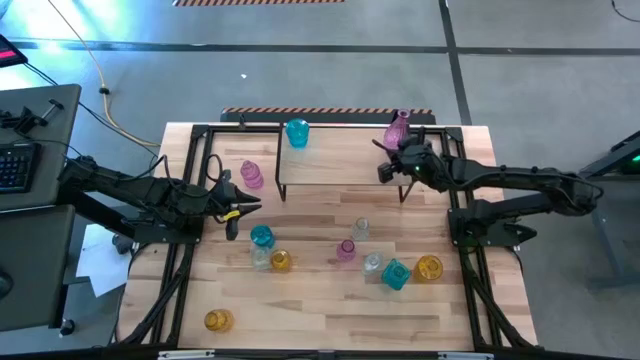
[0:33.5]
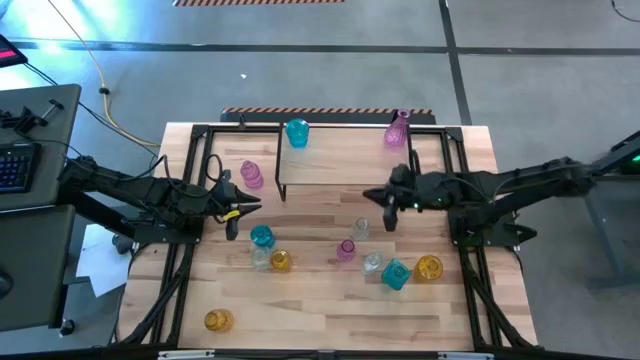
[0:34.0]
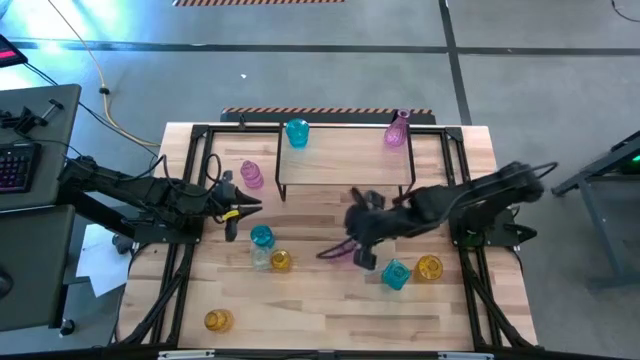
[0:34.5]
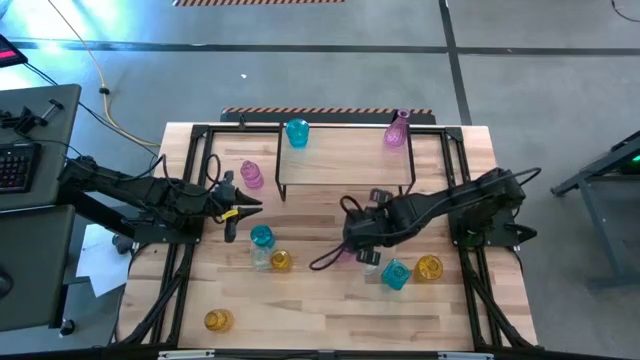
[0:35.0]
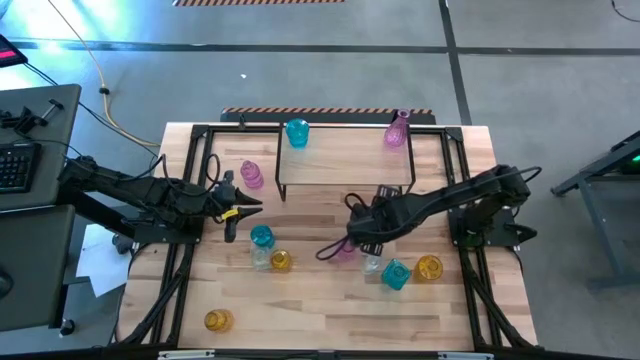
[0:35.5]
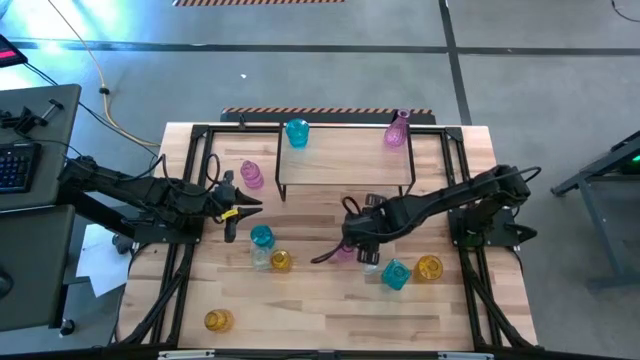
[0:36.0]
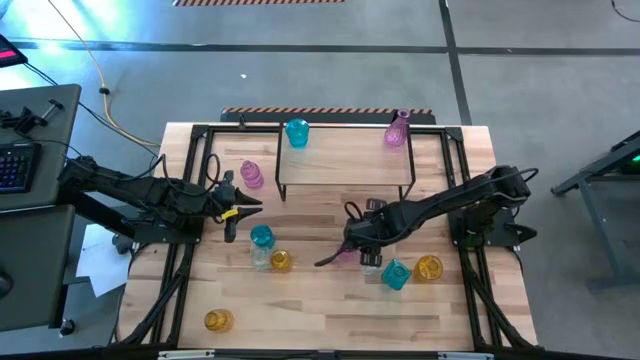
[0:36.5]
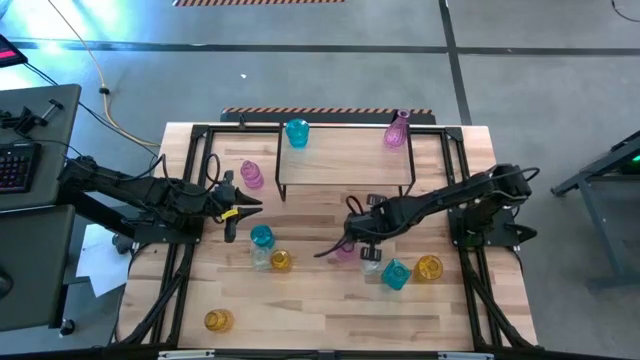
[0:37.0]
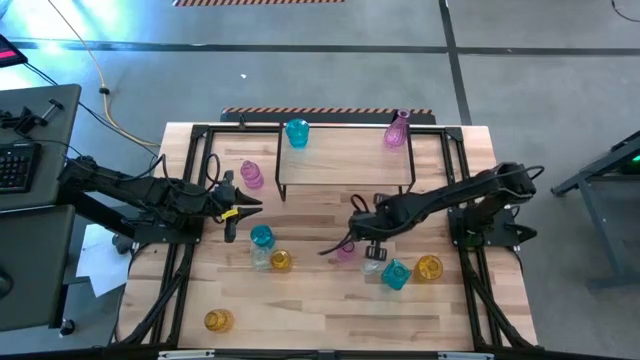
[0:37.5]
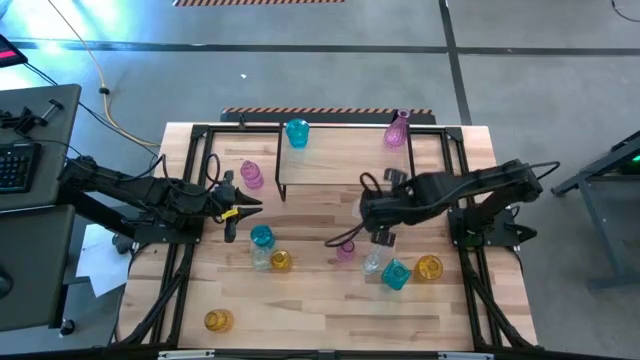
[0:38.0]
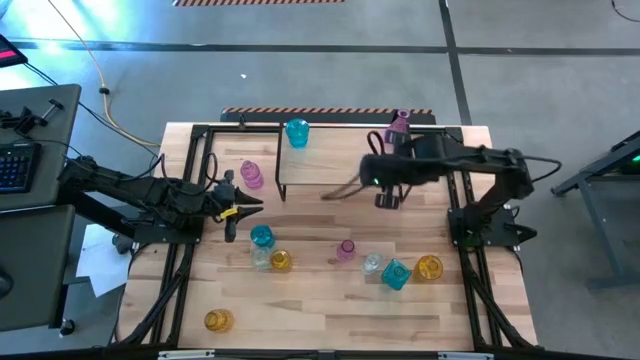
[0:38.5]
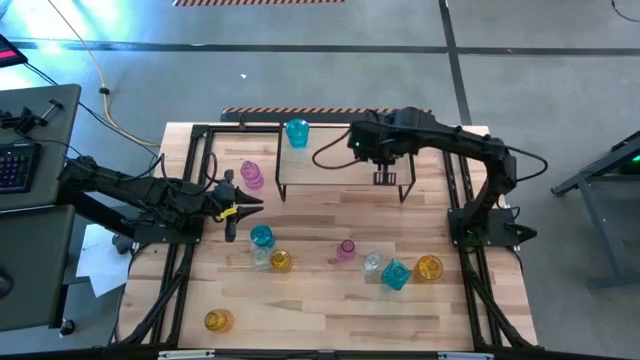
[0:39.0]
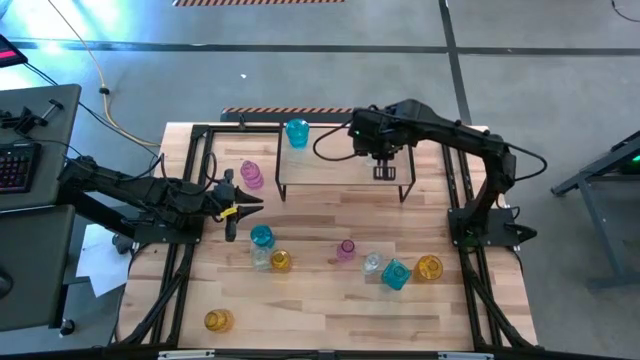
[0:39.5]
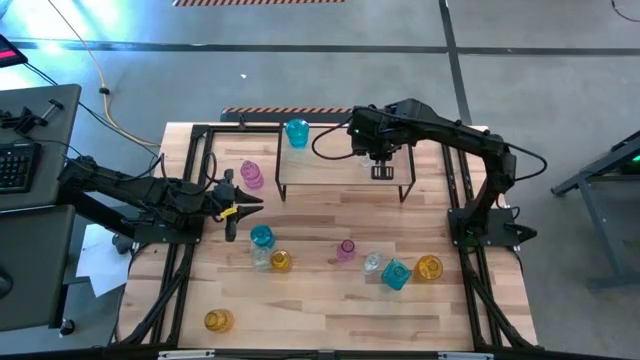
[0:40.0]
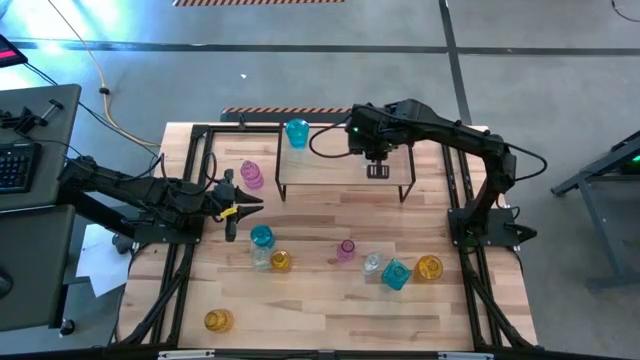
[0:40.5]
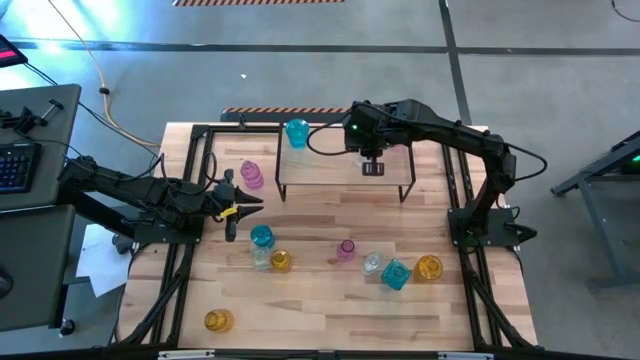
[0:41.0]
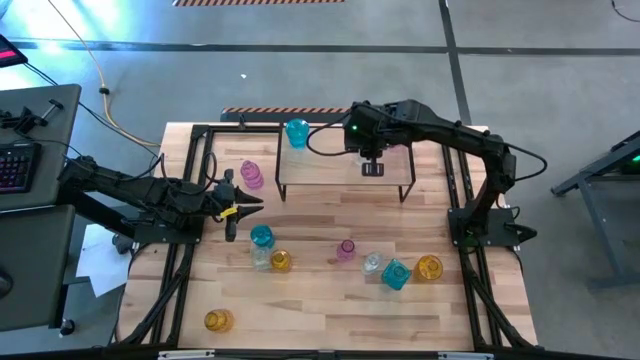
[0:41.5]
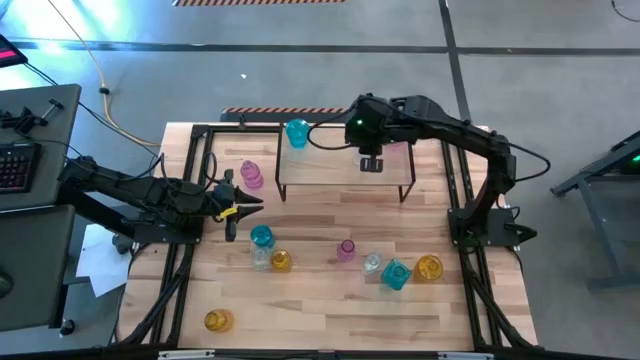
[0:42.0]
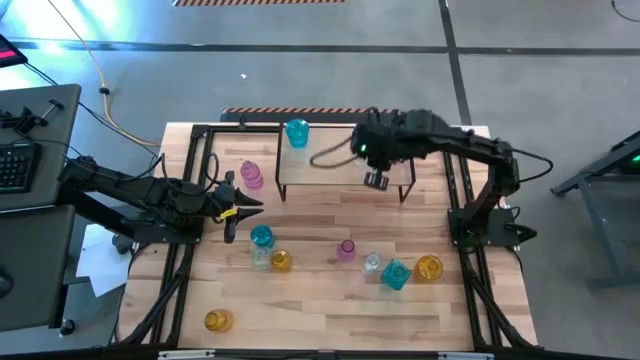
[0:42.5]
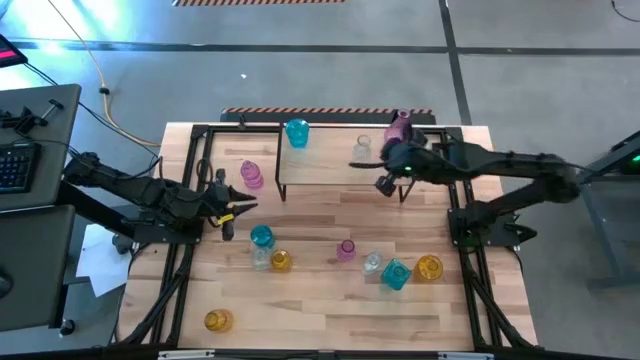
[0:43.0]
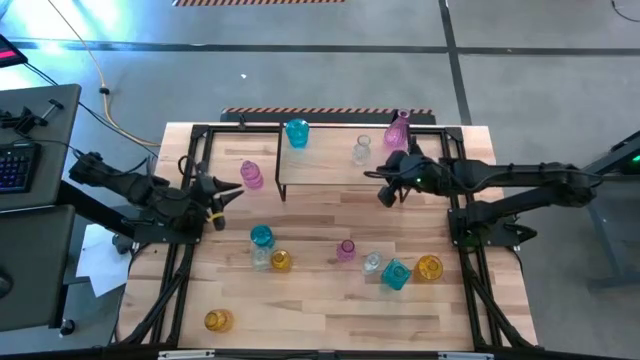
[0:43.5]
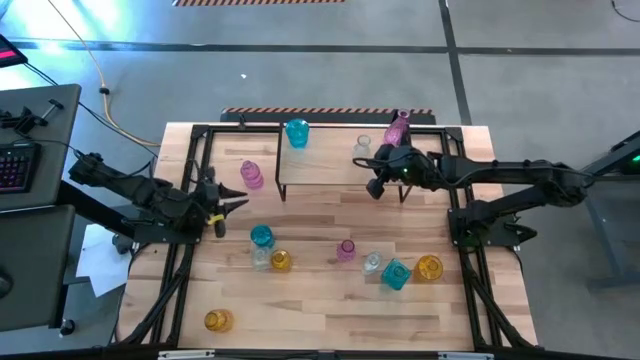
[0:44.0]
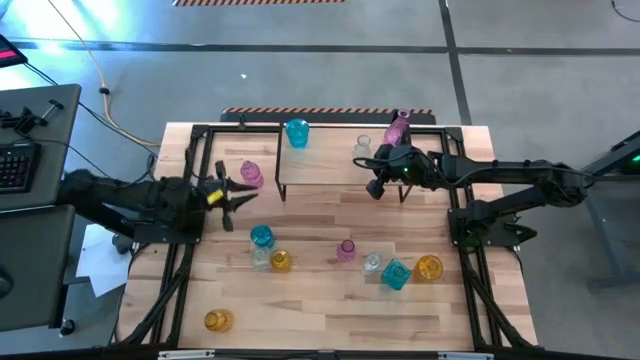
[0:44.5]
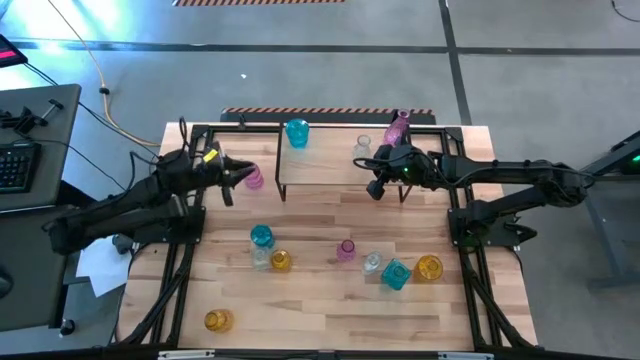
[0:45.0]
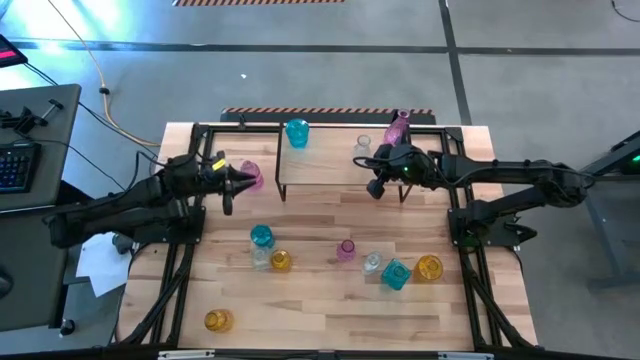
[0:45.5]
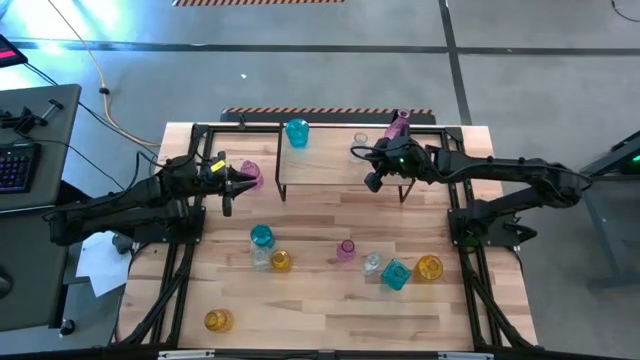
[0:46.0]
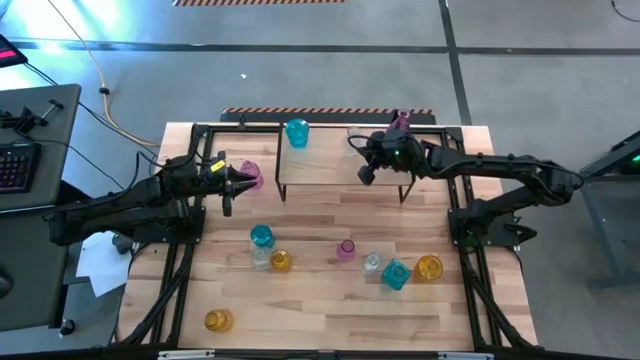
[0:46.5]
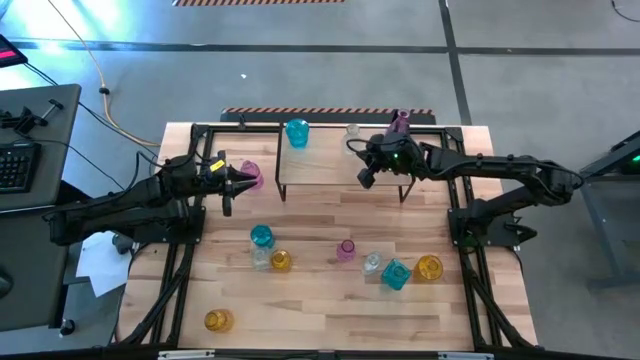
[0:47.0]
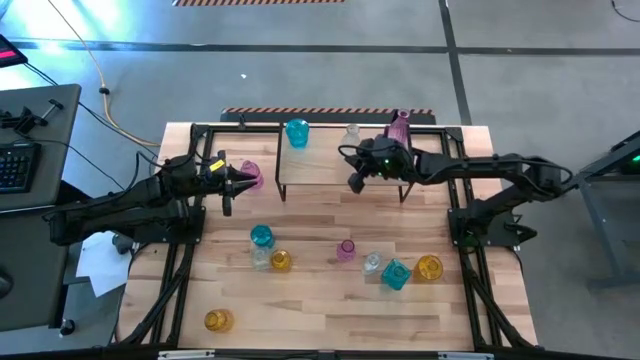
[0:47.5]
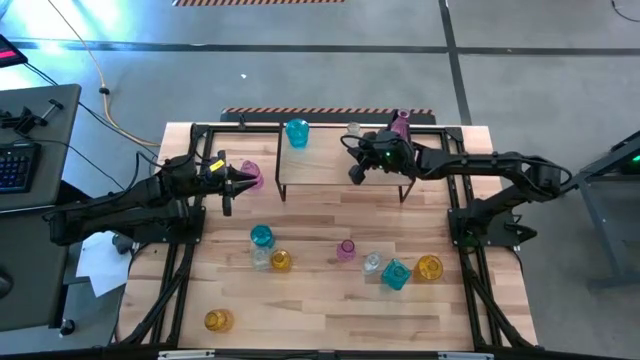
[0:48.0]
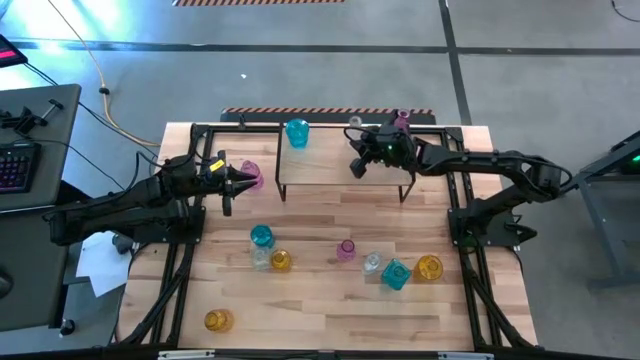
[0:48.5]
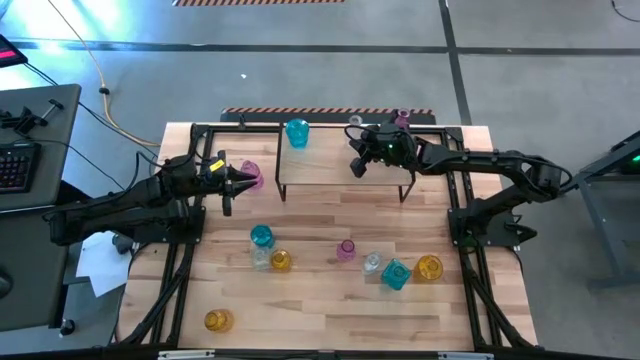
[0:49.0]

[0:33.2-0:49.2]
Task: sort vases onto shelf
Put the top transparent vase on the shelf

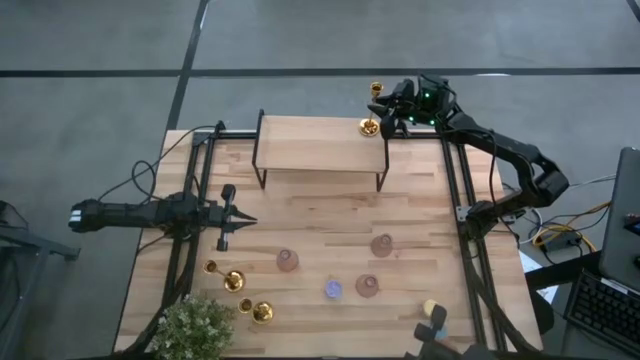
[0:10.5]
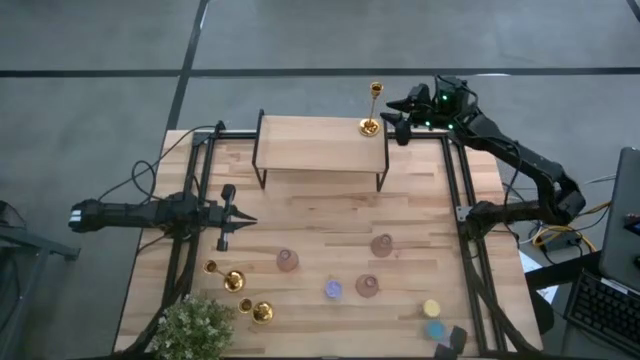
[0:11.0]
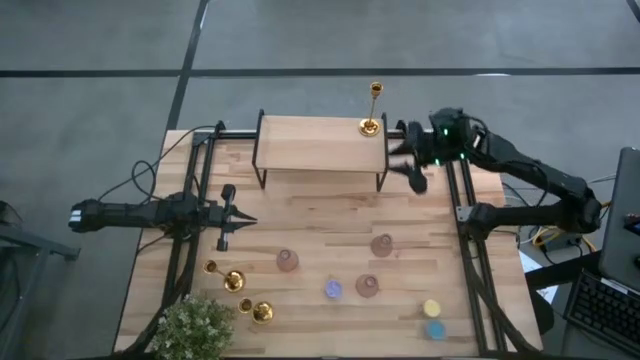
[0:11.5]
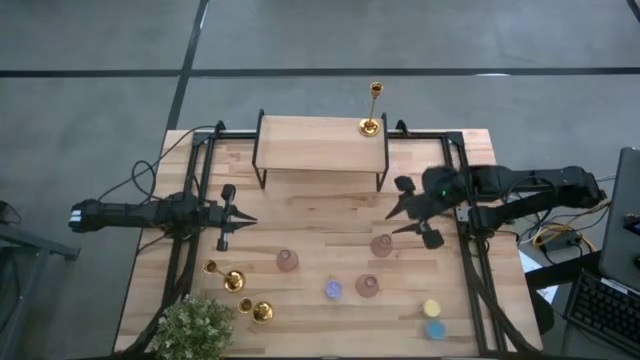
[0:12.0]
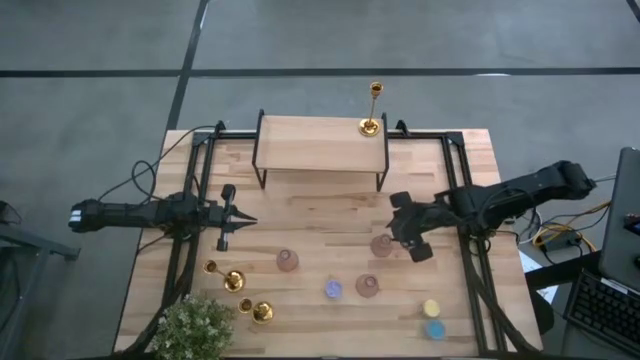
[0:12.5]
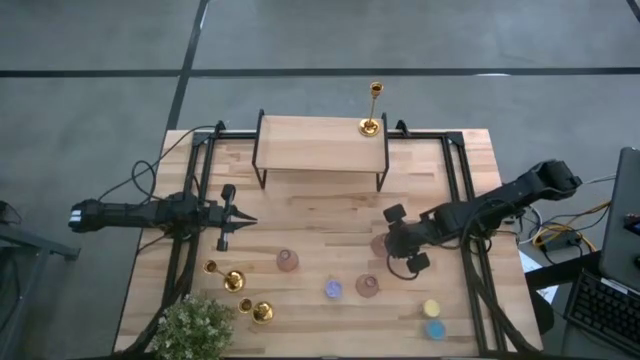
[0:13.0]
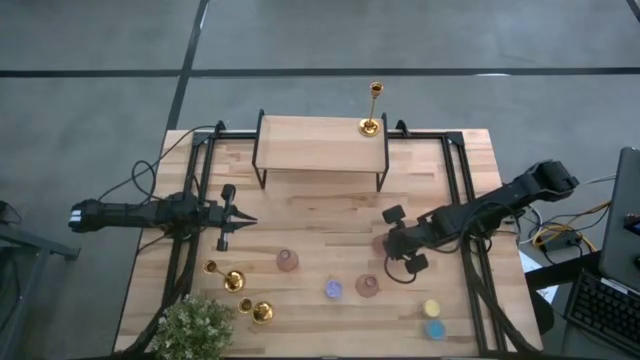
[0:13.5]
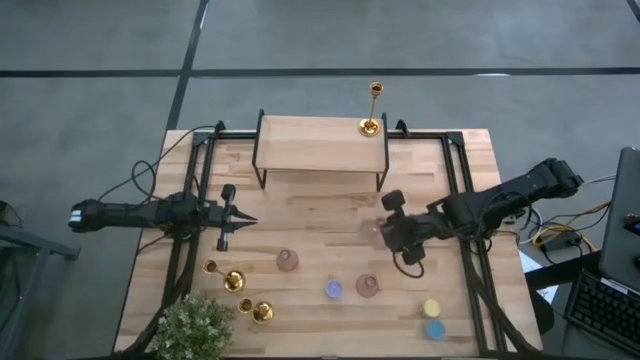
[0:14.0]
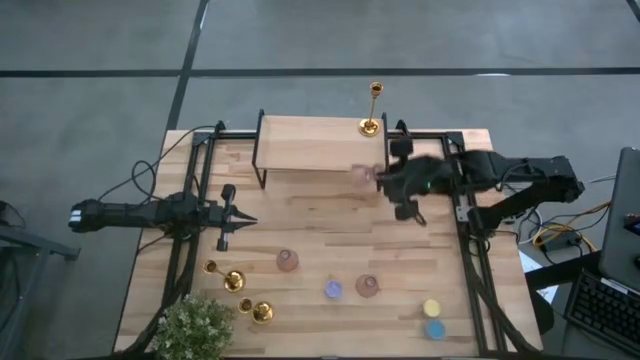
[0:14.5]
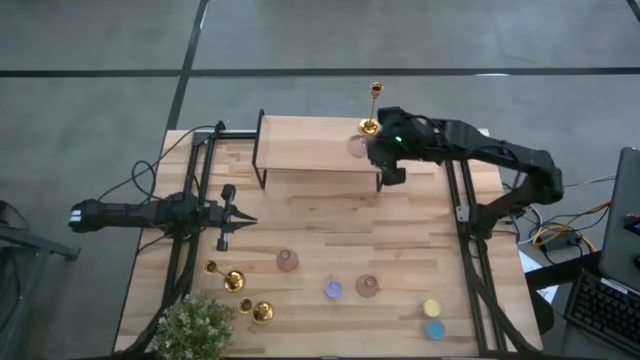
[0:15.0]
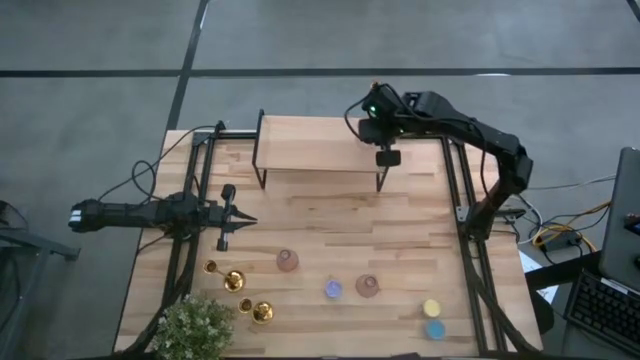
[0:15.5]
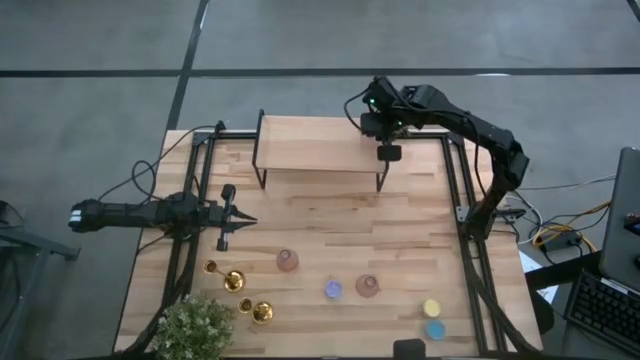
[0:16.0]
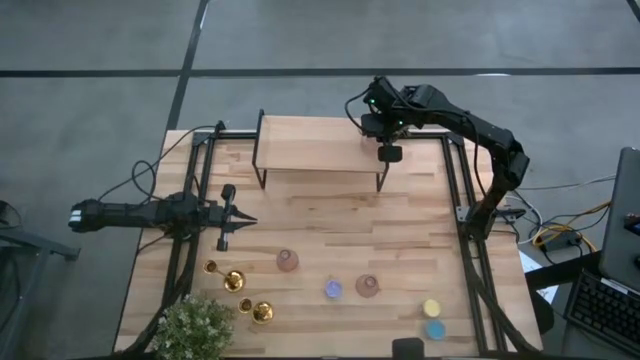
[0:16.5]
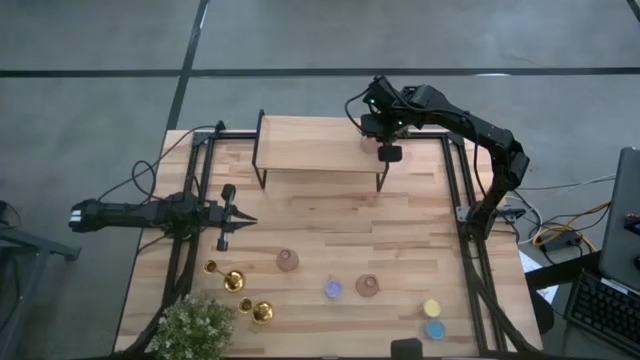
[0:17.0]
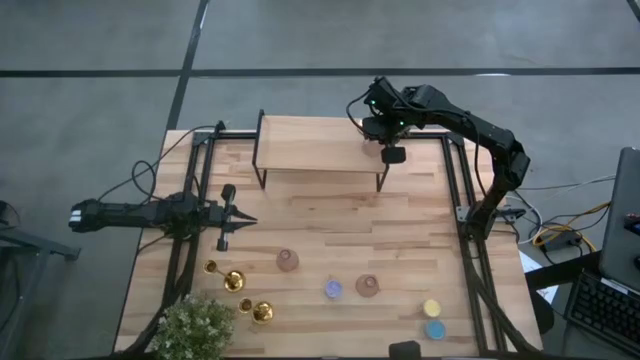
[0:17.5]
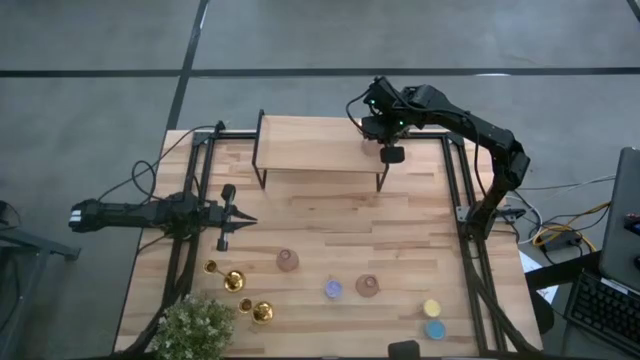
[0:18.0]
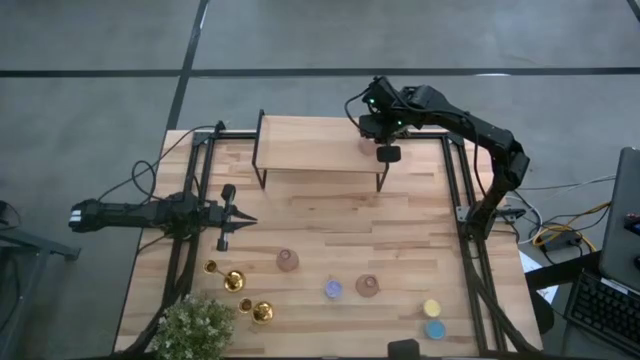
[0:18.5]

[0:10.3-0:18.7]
Task: Pick & Place candle stick holders
Put the top purple candle holder on the shelf
